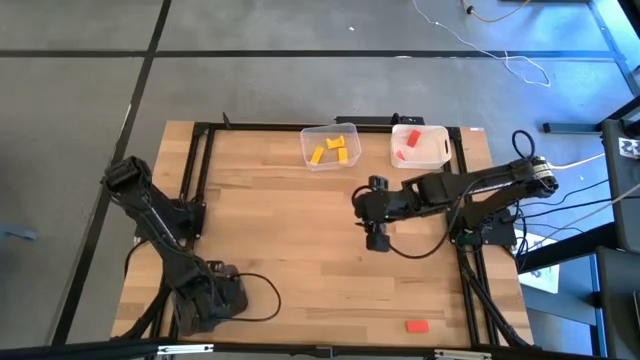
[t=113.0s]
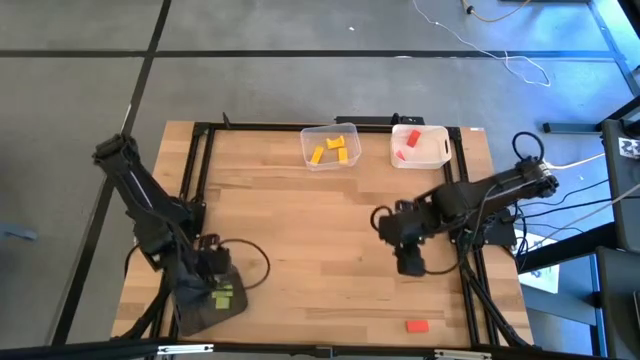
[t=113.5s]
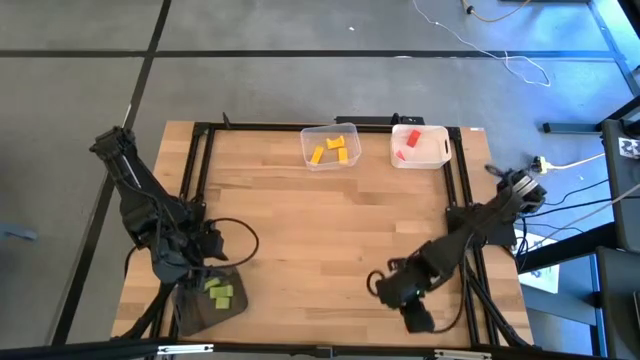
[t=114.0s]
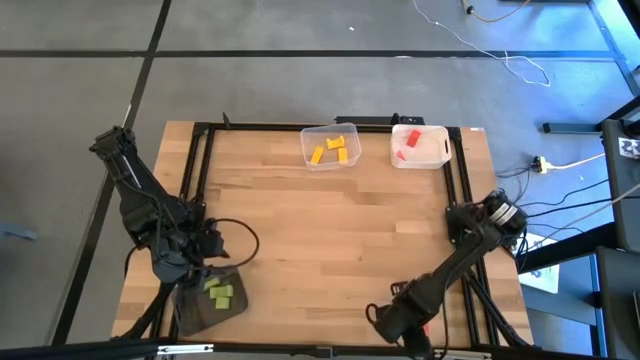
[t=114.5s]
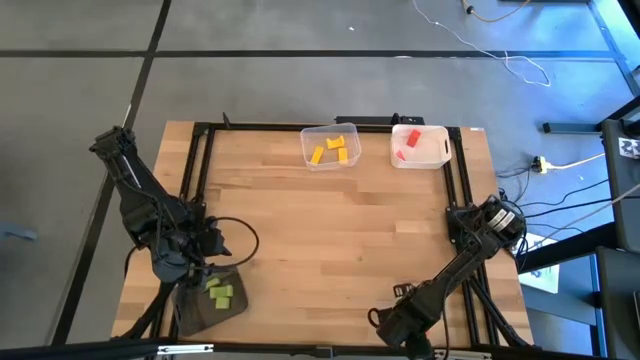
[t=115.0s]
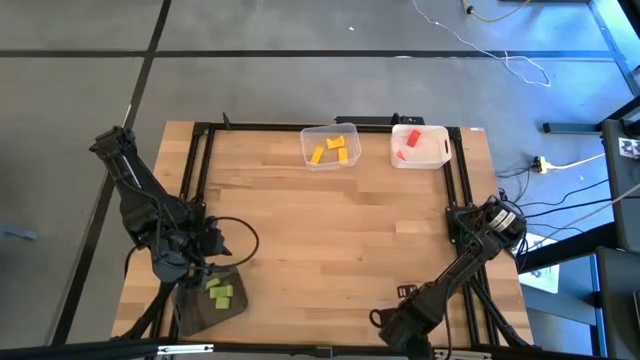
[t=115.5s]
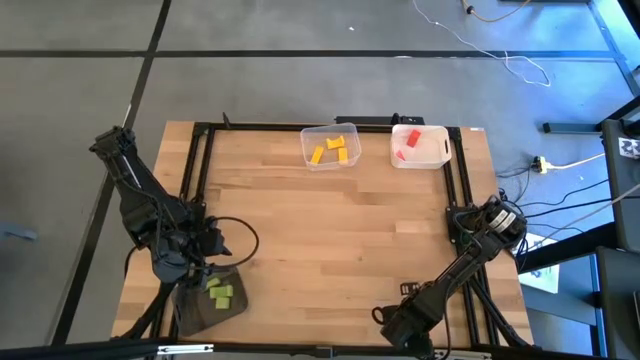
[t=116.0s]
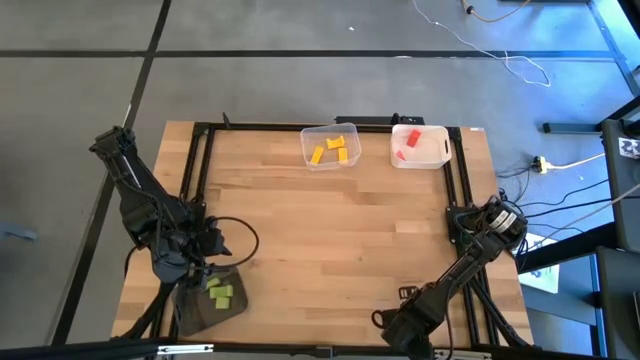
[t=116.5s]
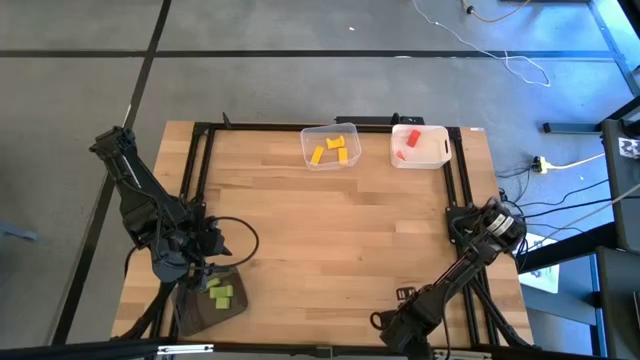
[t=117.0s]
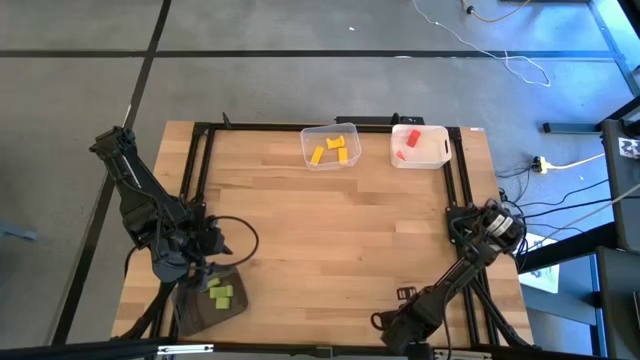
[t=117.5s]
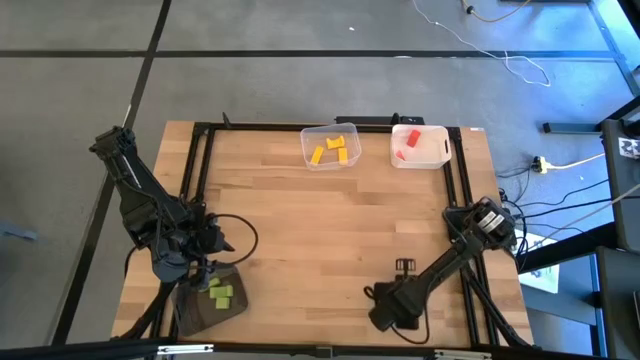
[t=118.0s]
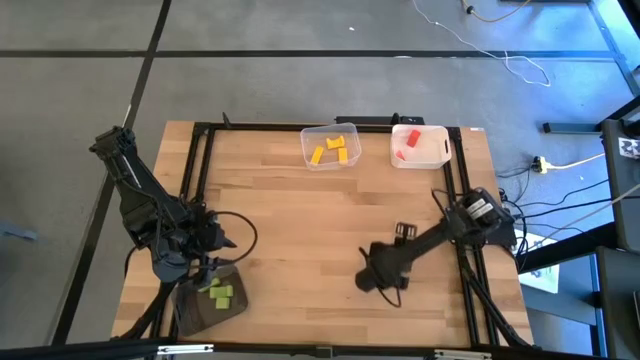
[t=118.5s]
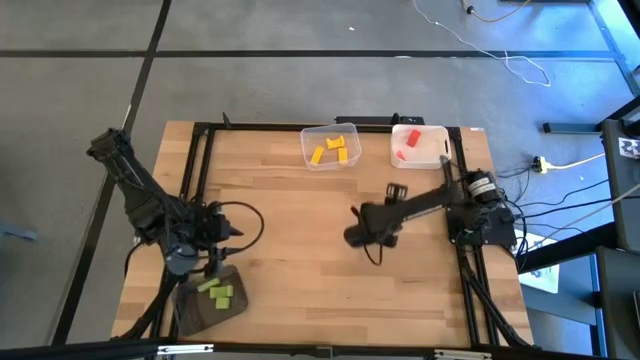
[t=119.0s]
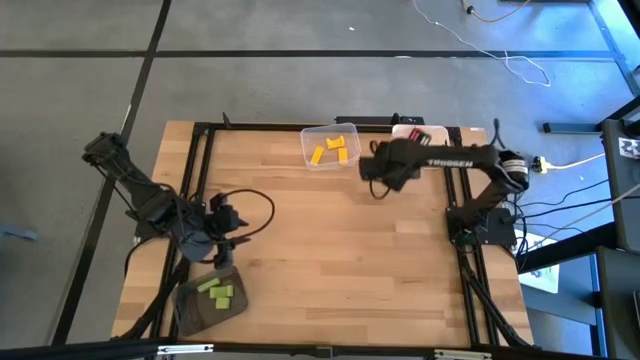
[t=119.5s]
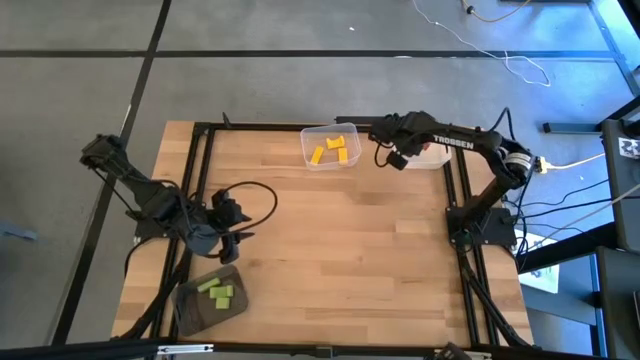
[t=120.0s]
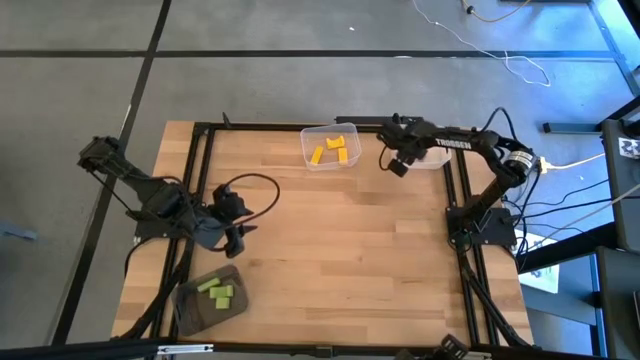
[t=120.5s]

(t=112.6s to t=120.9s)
Task: Sort & place blocks by color
Put the orange block into the white bin

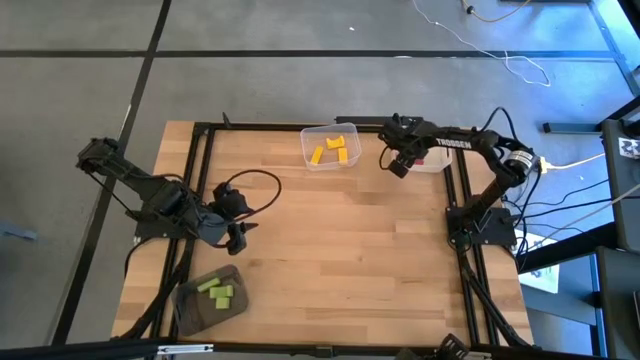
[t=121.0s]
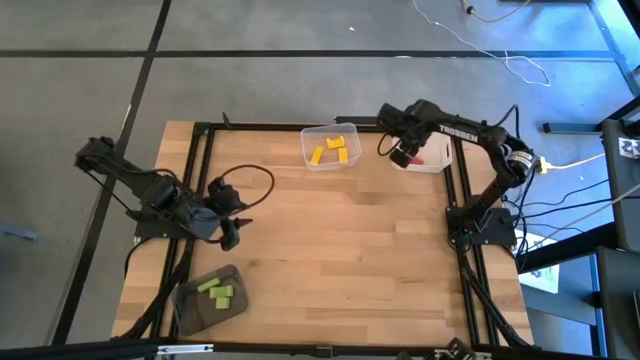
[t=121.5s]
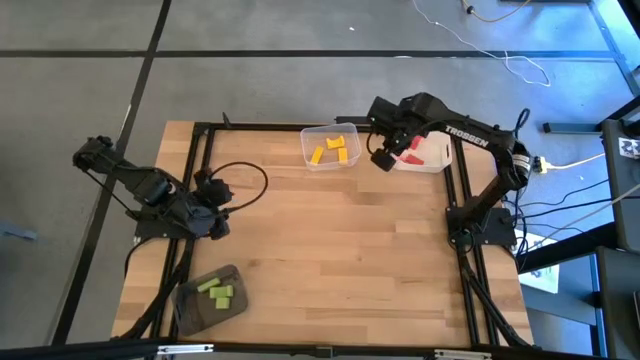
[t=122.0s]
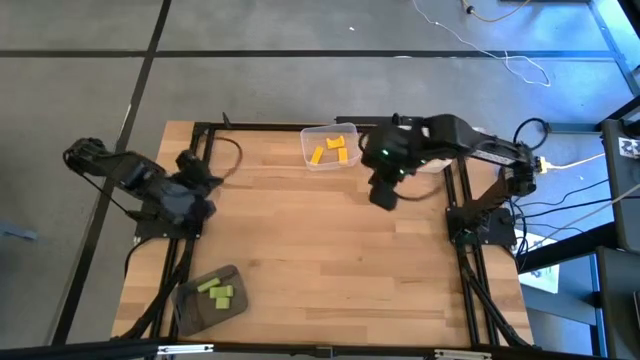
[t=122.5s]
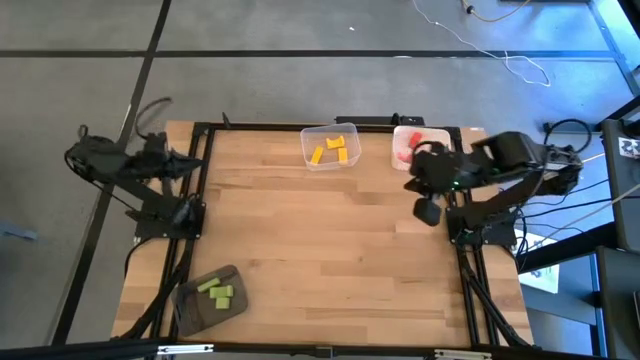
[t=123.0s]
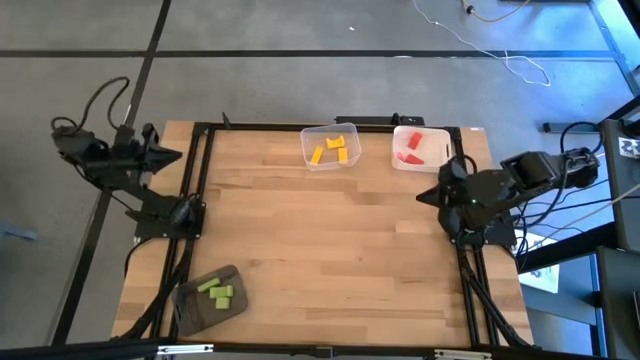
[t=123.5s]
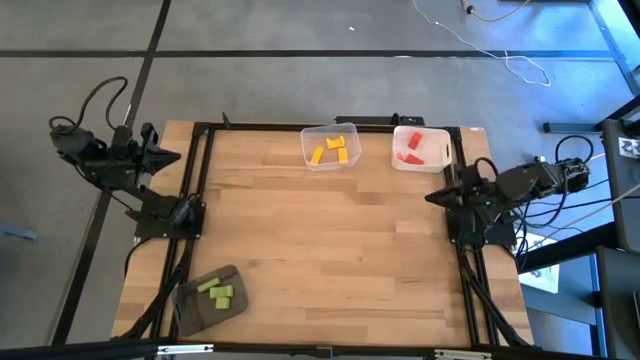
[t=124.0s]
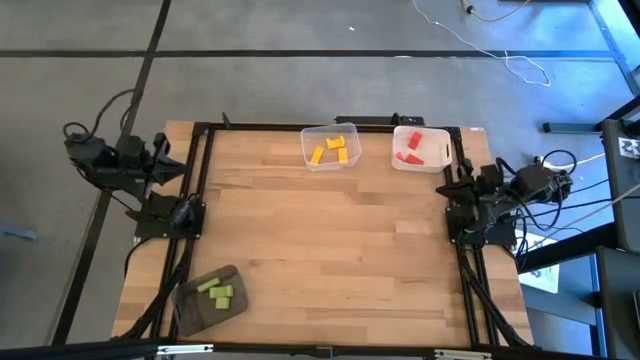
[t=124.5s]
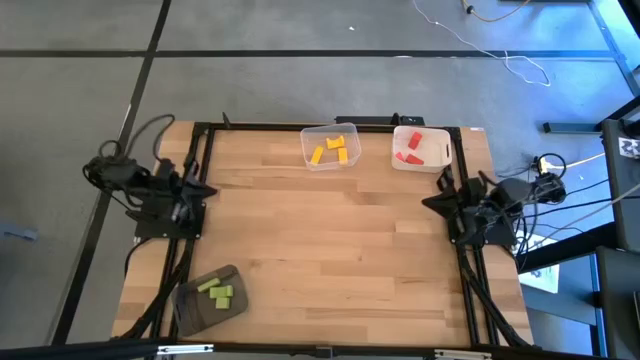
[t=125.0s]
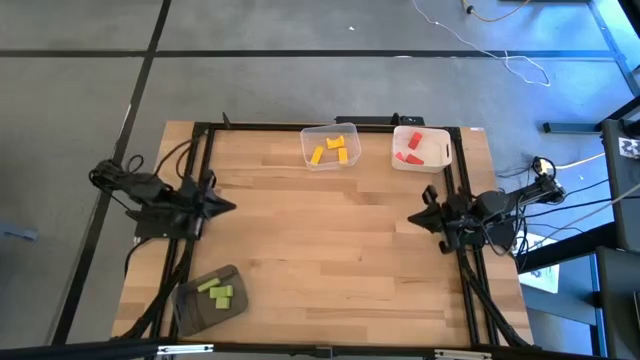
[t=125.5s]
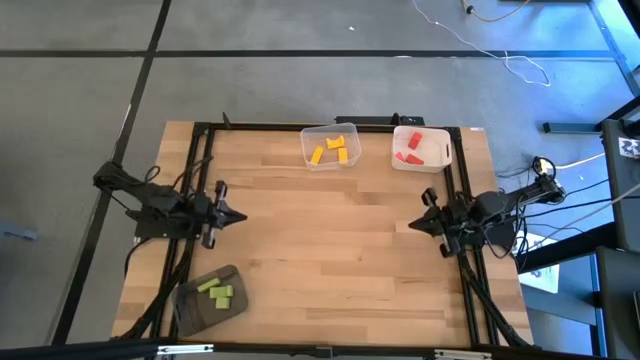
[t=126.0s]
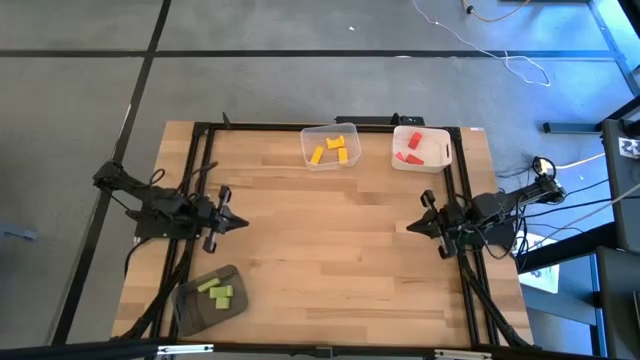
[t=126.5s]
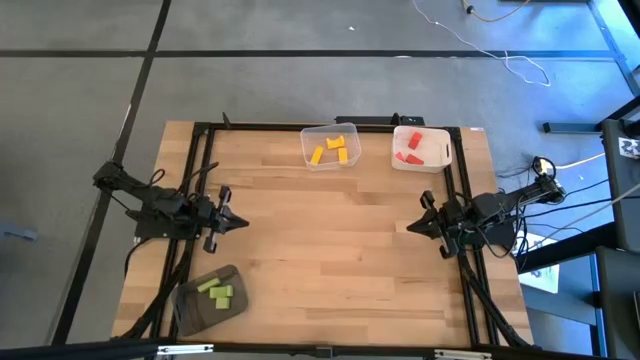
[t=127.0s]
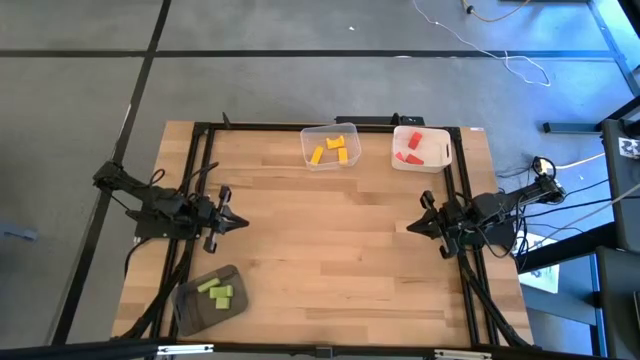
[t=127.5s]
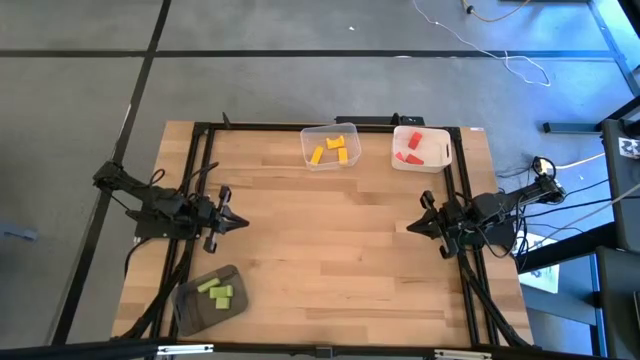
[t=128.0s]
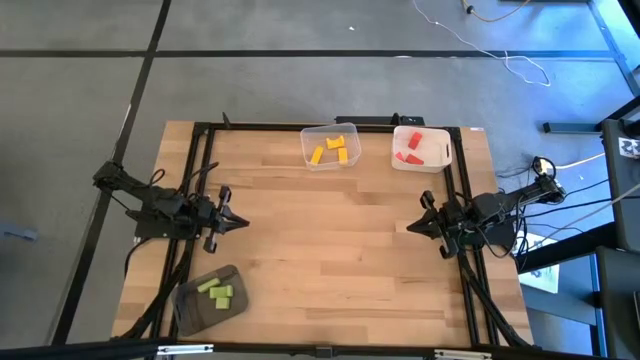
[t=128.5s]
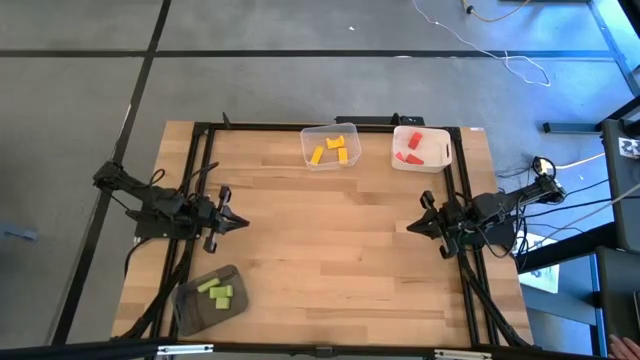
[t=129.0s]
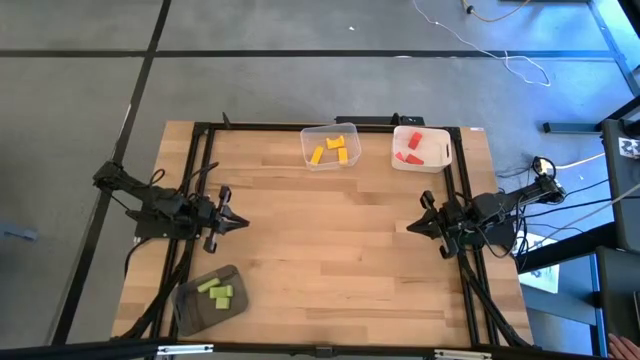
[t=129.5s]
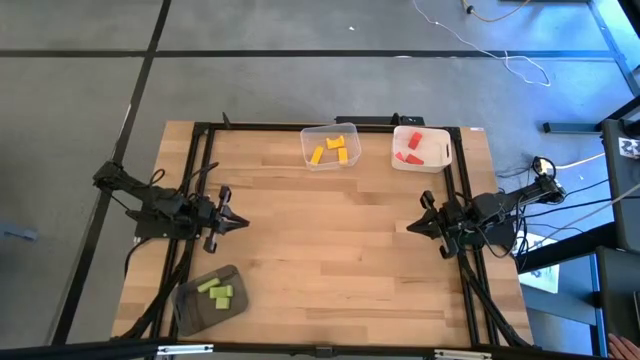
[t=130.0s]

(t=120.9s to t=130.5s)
Return to Home Position

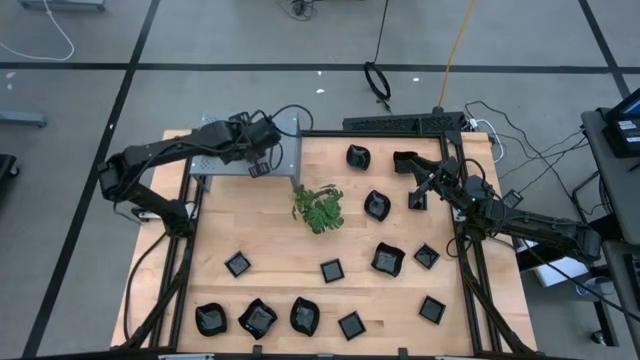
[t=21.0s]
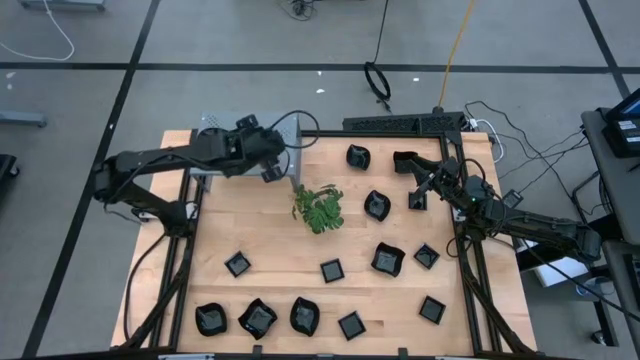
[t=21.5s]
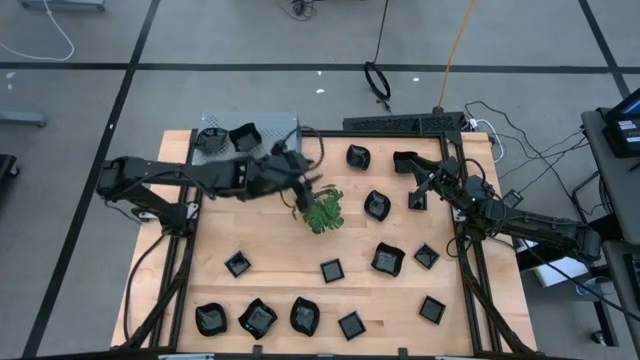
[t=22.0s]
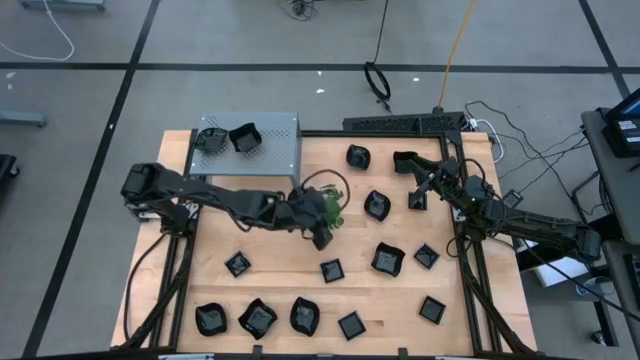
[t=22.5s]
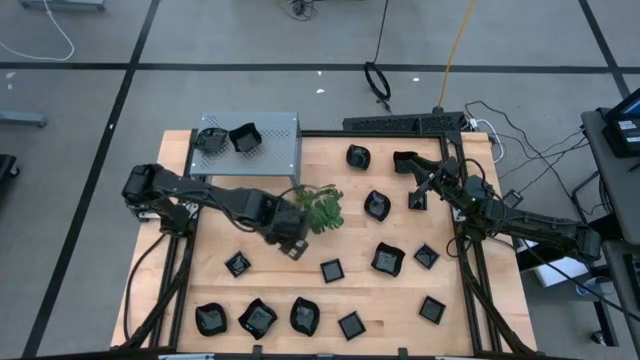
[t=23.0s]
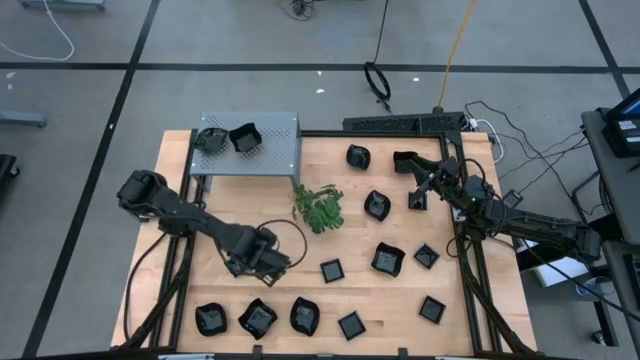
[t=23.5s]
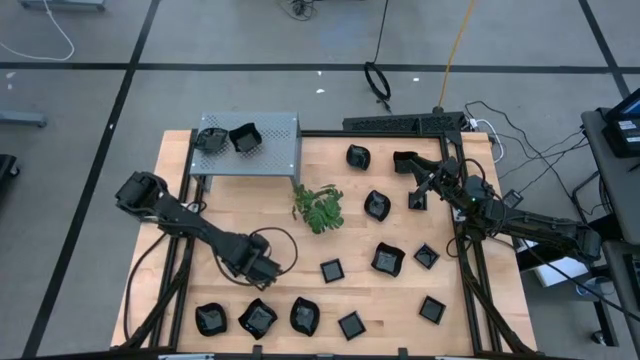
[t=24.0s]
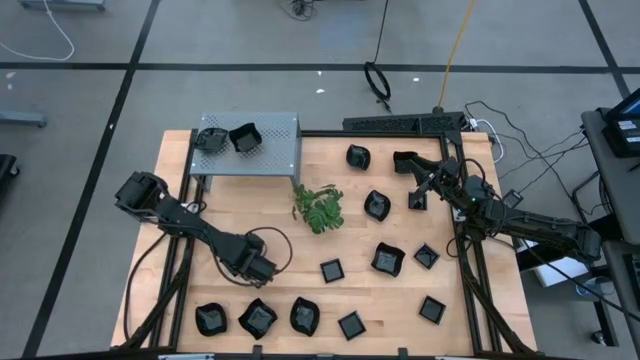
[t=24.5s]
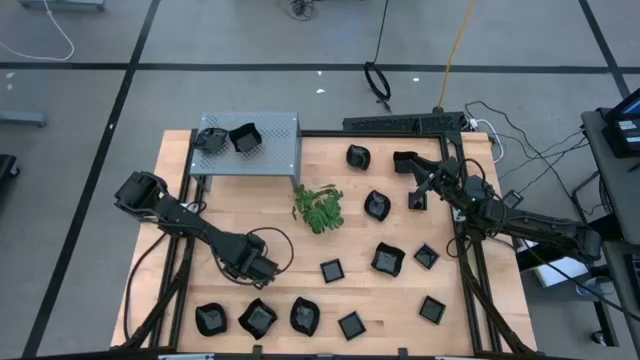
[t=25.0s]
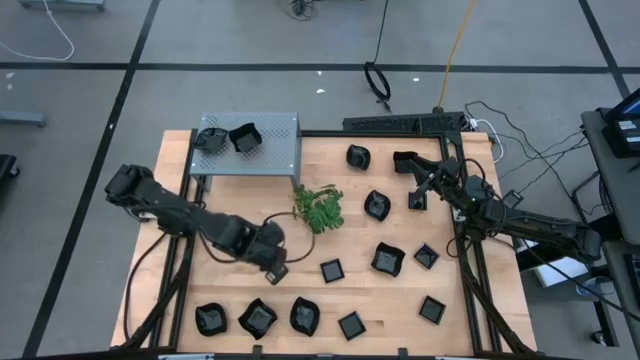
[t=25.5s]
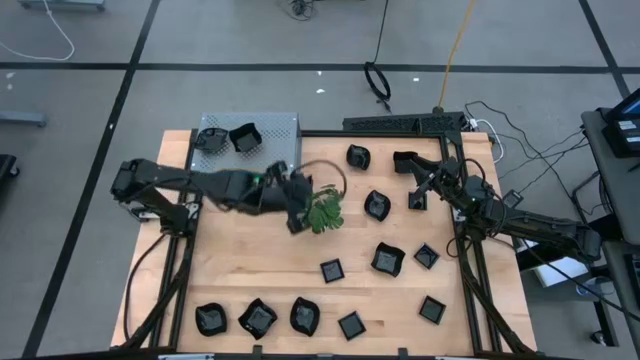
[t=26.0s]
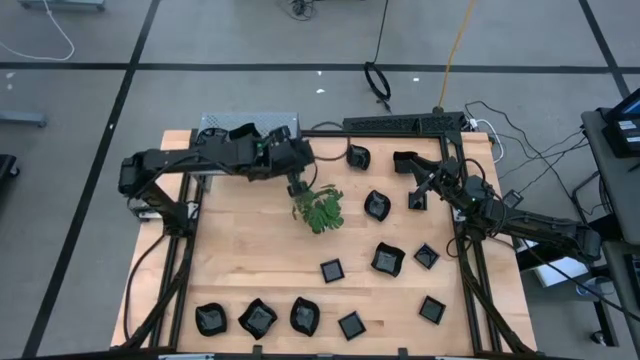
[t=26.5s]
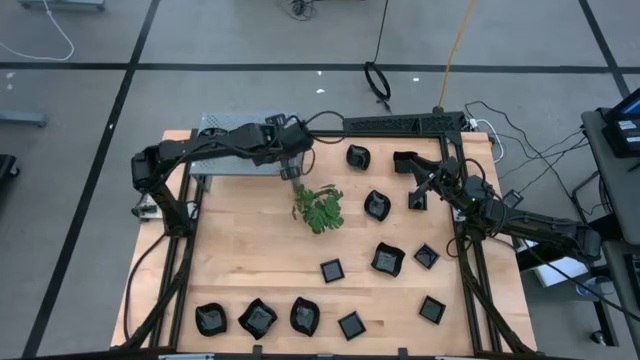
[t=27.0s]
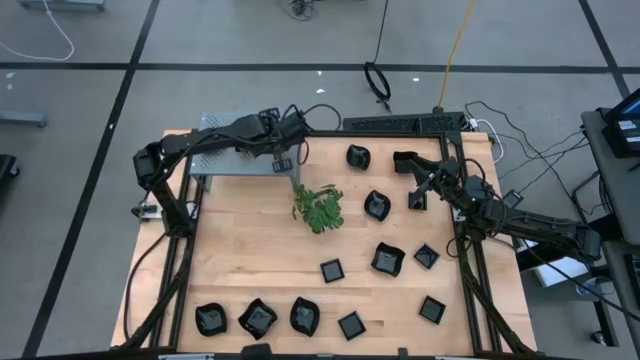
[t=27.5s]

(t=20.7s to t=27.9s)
Task: Pick & Place Mini shaped plates
Put the square plate on the shelf
